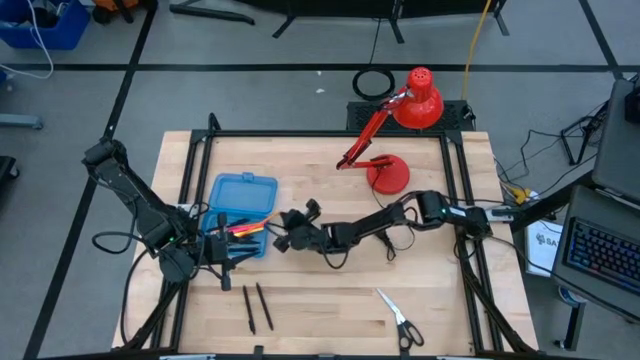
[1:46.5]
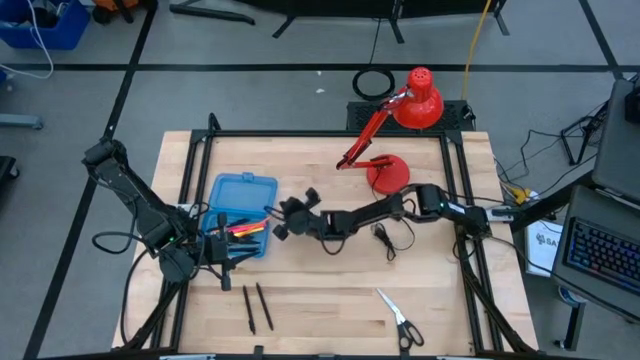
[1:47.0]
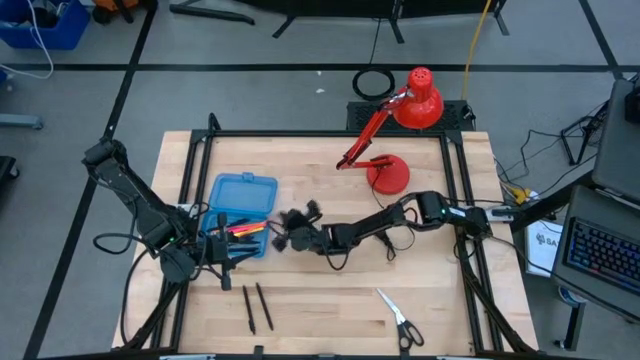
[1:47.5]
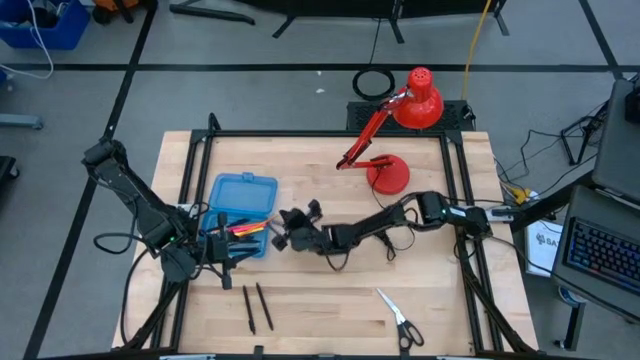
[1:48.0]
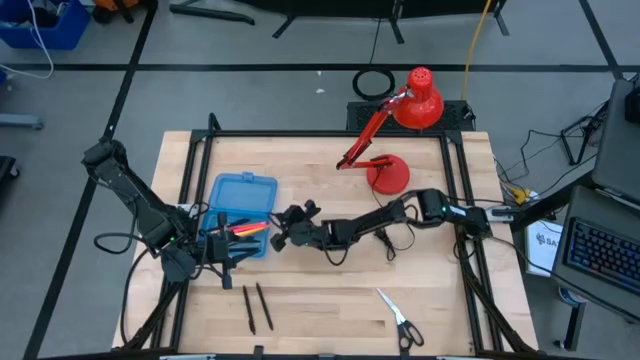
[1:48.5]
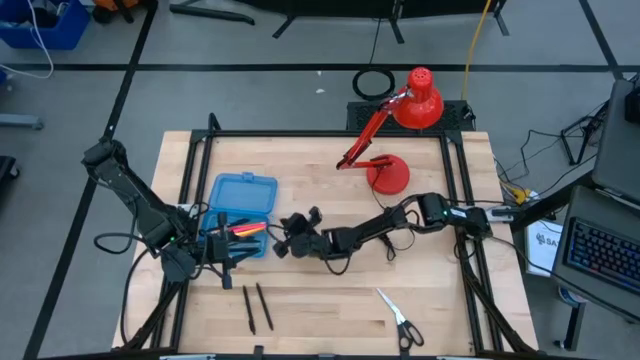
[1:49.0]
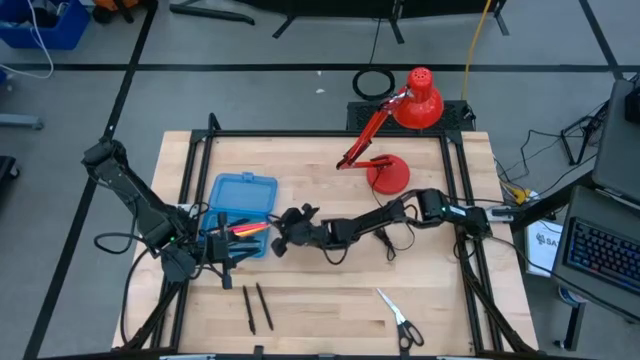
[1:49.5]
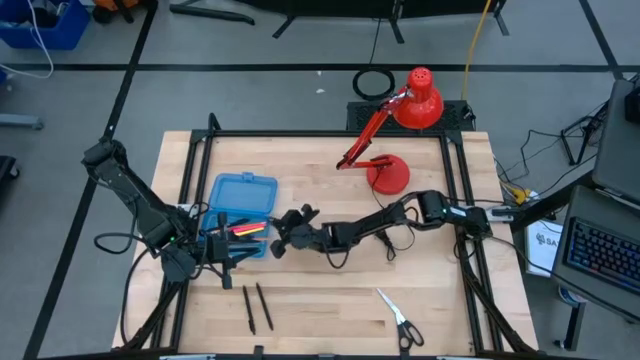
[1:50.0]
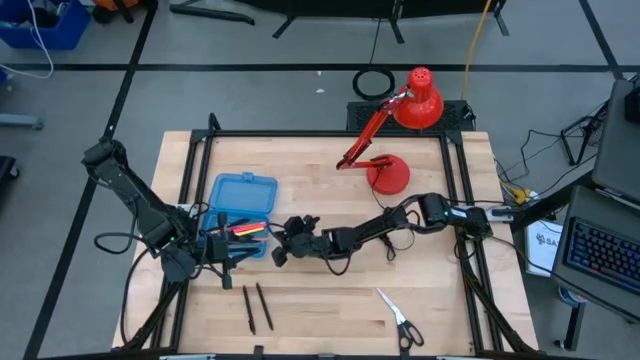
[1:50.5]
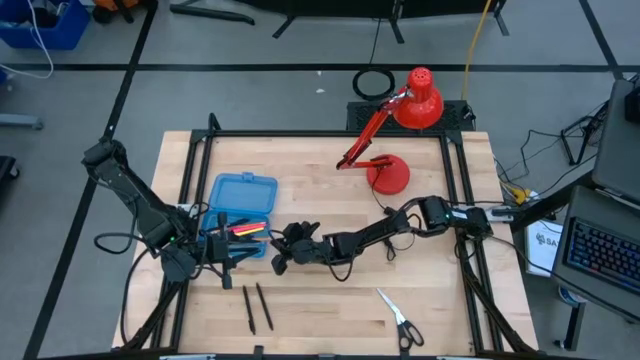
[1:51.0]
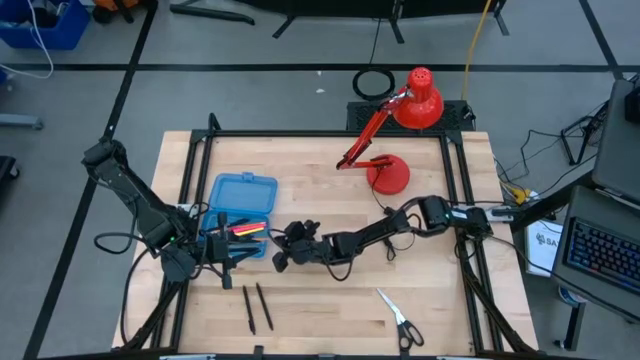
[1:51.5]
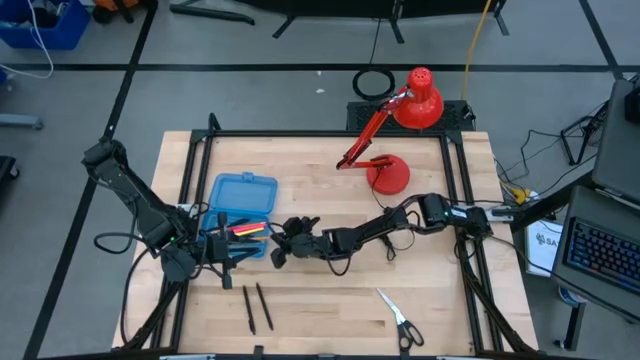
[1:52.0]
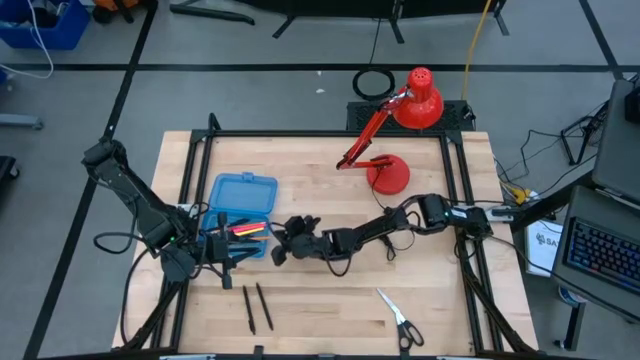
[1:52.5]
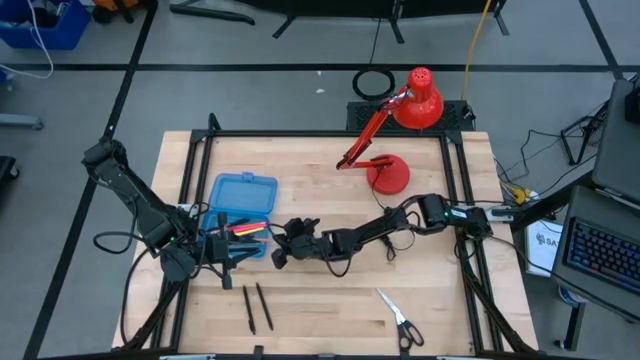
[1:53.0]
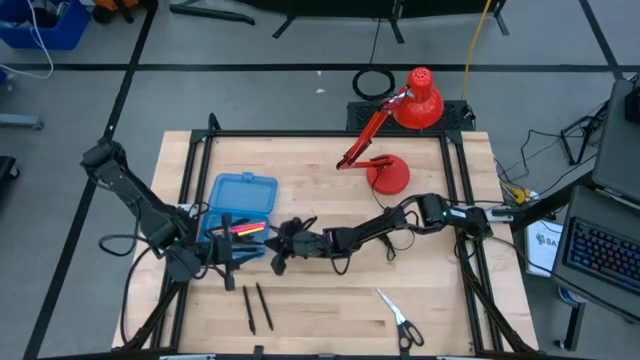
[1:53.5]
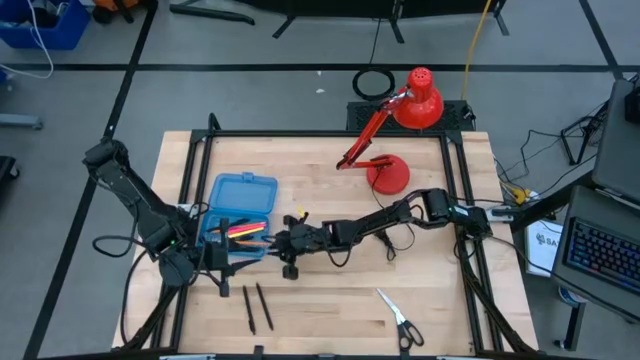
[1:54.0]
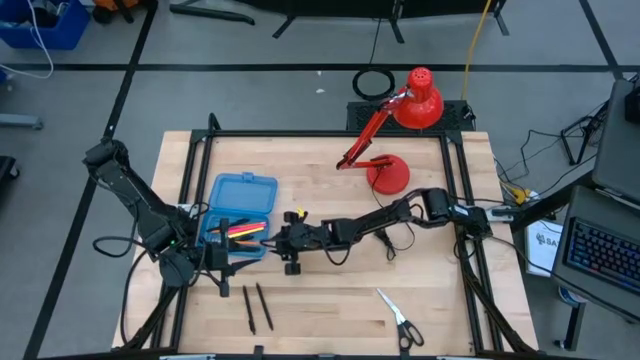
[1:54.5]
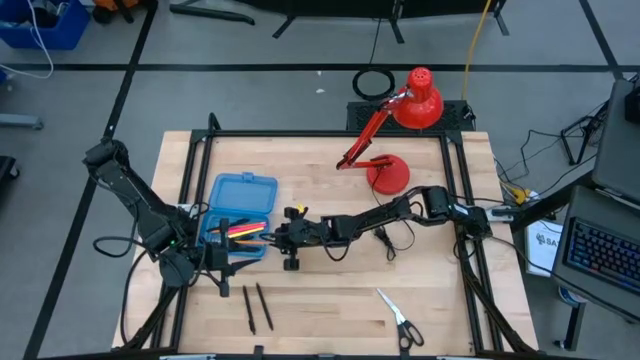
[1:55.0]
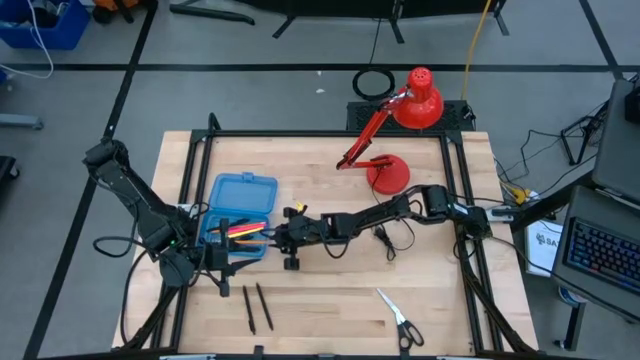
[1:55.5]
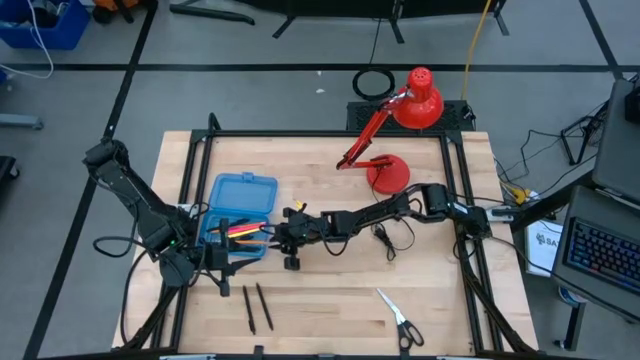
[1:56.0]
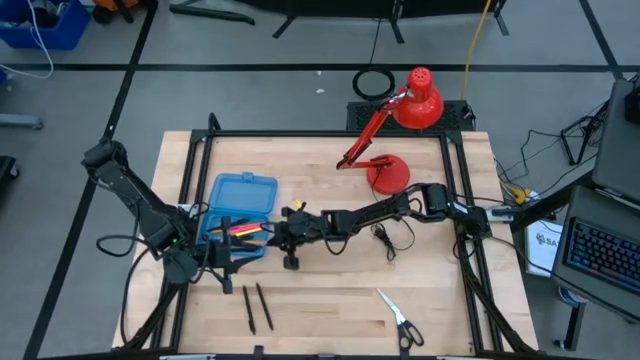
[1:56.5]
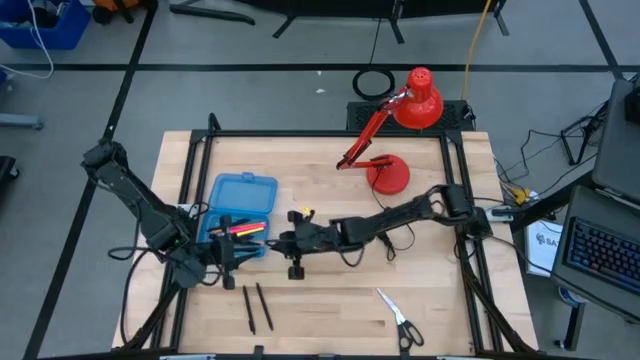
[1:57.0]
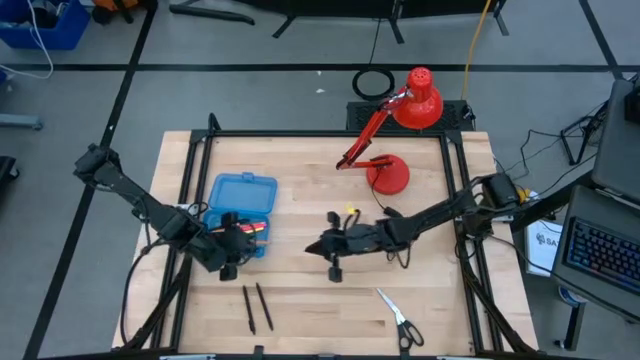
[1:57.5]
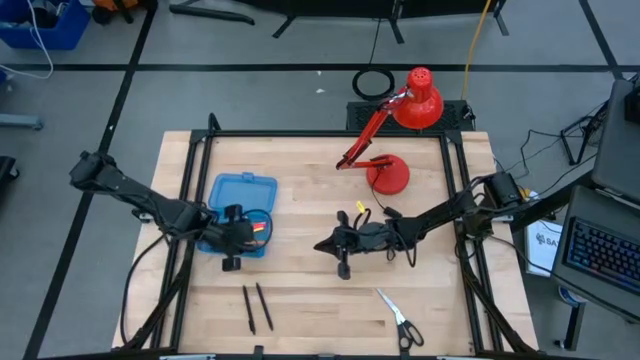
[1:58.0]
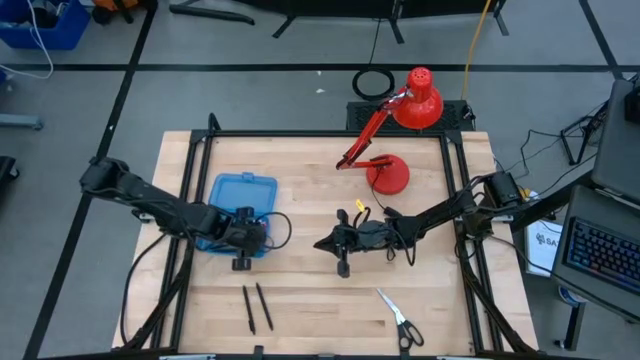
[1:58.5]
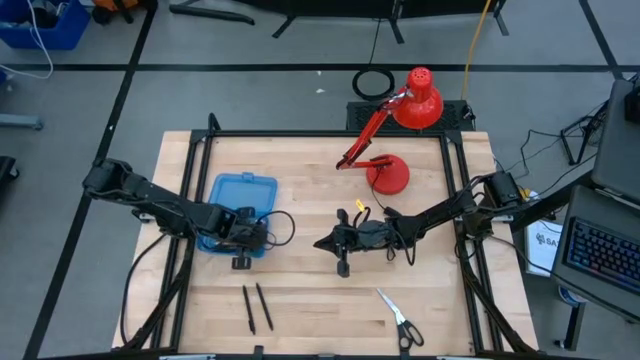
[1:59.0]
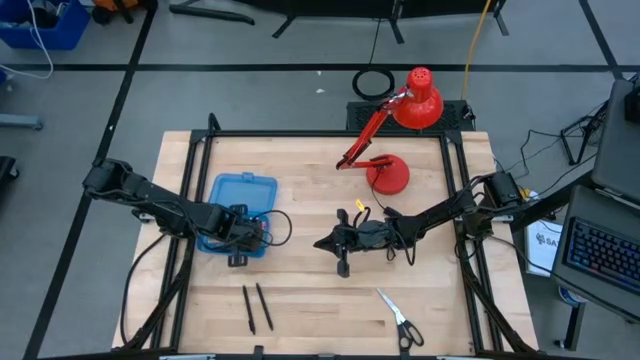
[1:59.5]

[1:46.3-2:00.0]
Task: Pick & place school supplies into a supply box
Put the yellow pencil into the blue supply box

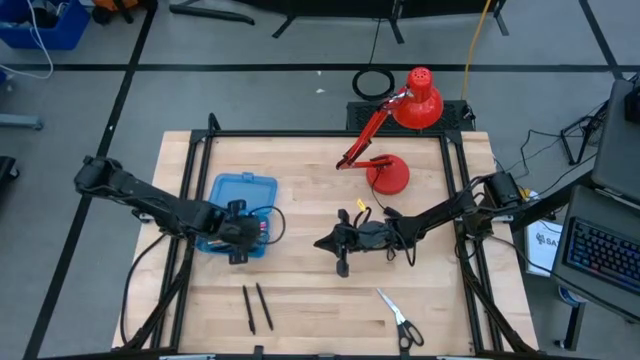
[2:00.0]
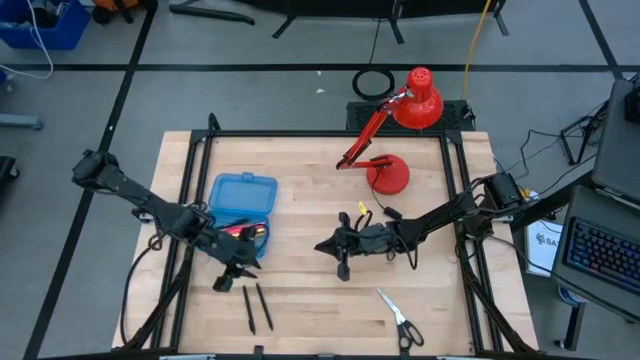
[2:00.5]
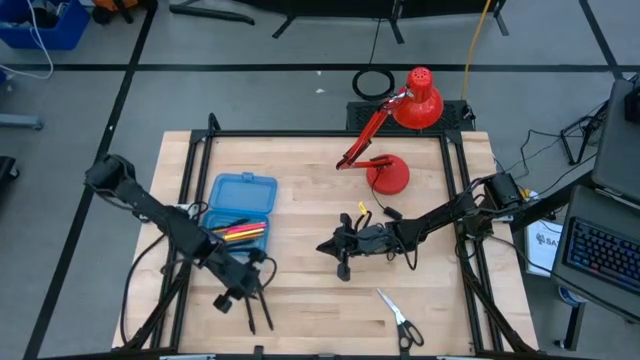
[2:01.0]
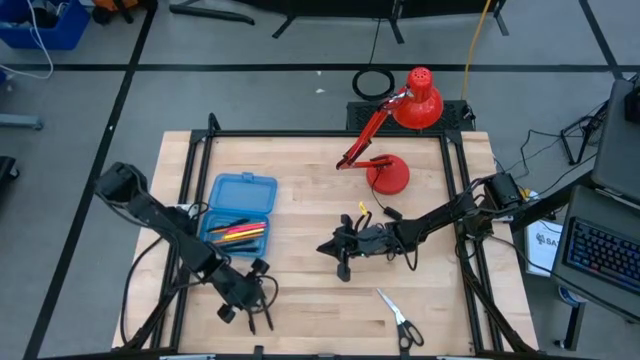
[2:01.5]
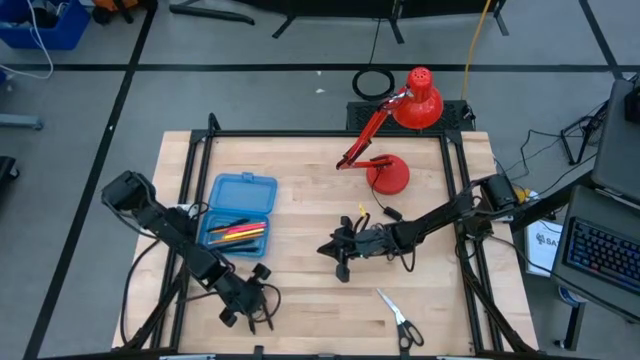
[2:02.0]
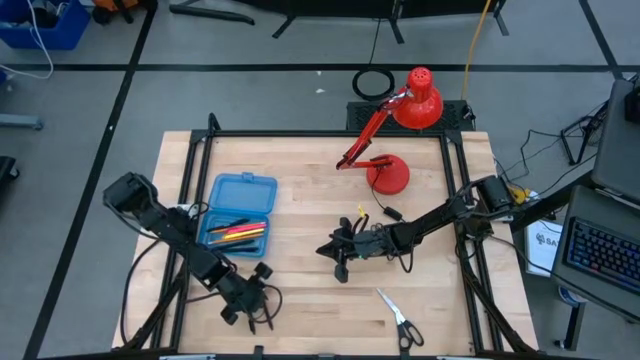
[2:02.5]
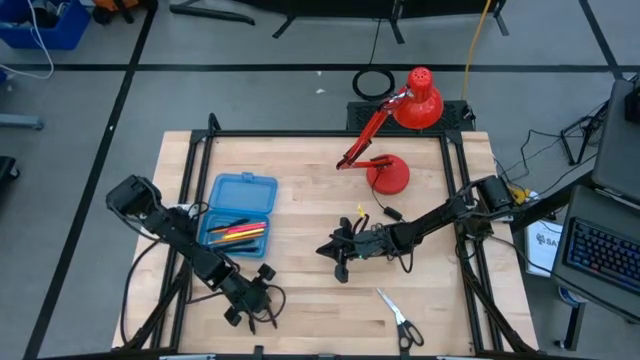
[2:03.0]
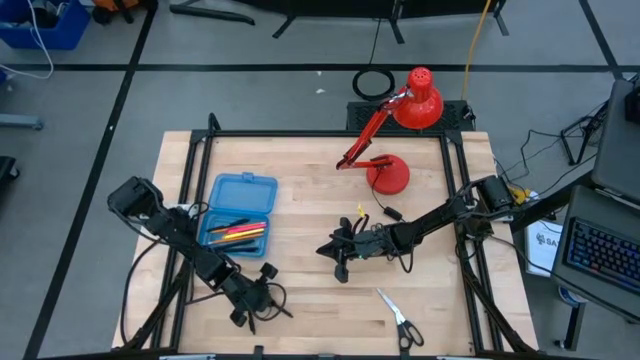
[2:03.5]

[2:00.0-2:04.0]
Put the black pen into the blue supply box

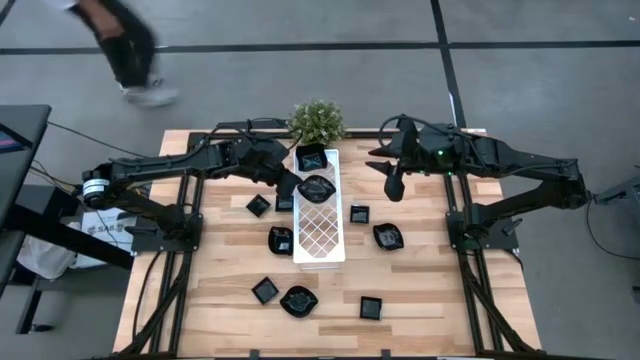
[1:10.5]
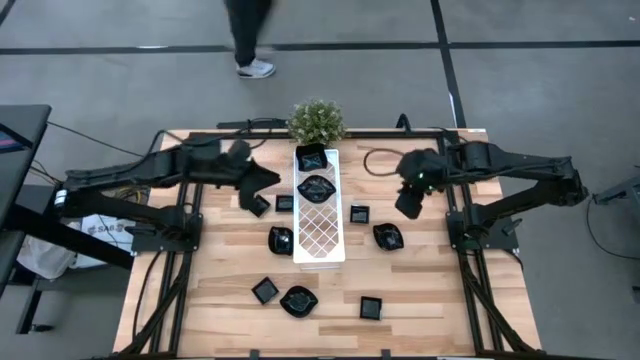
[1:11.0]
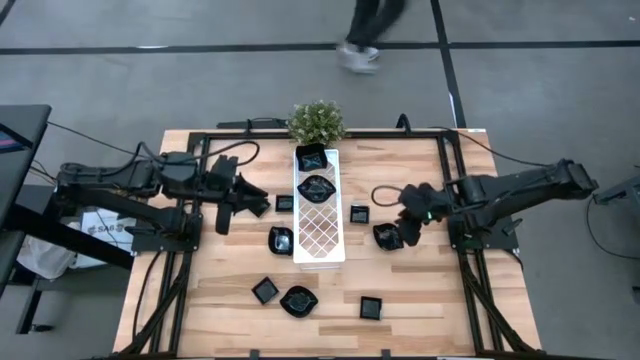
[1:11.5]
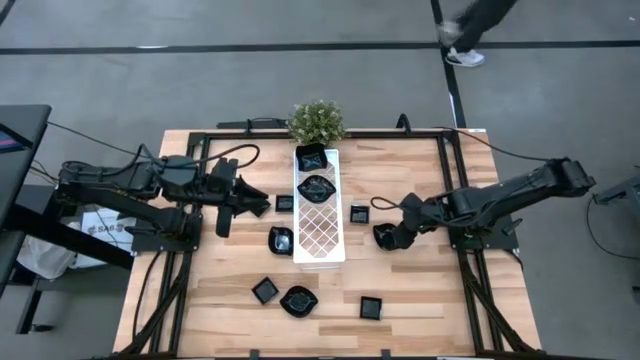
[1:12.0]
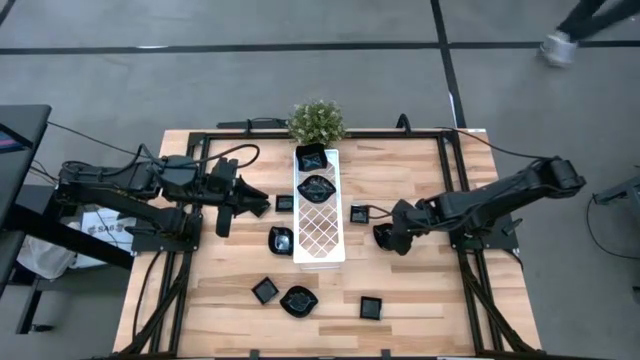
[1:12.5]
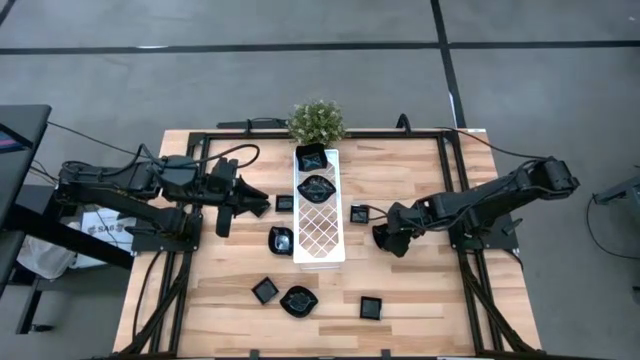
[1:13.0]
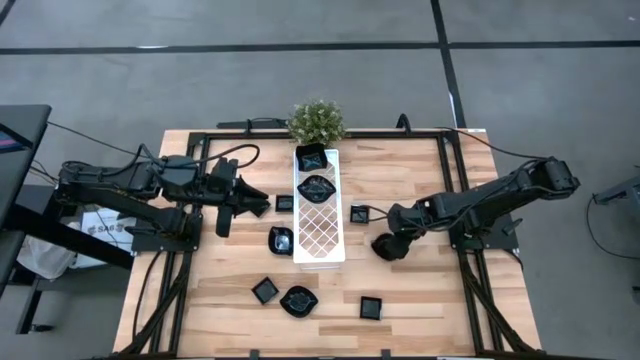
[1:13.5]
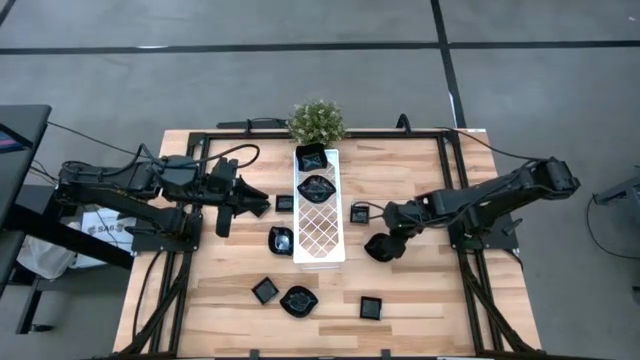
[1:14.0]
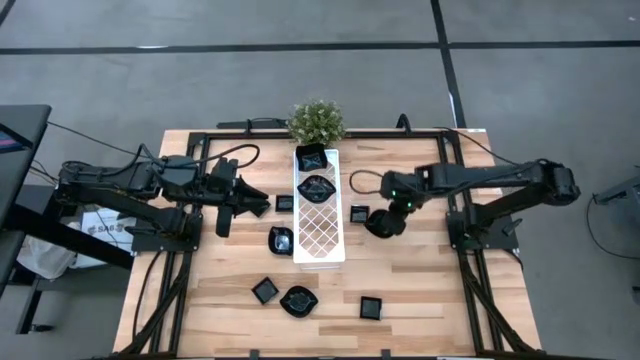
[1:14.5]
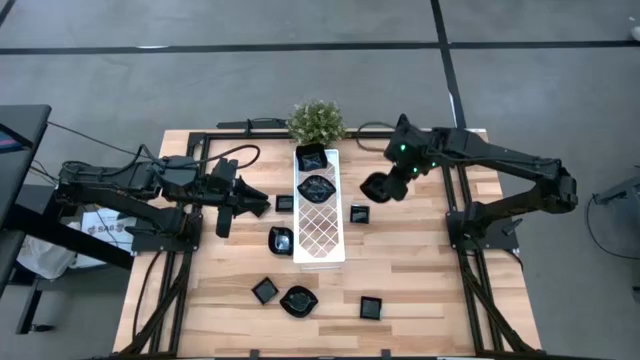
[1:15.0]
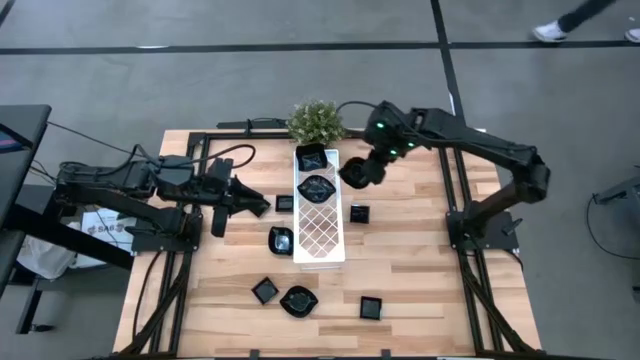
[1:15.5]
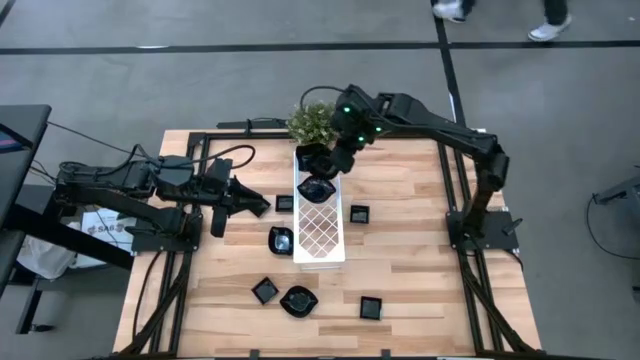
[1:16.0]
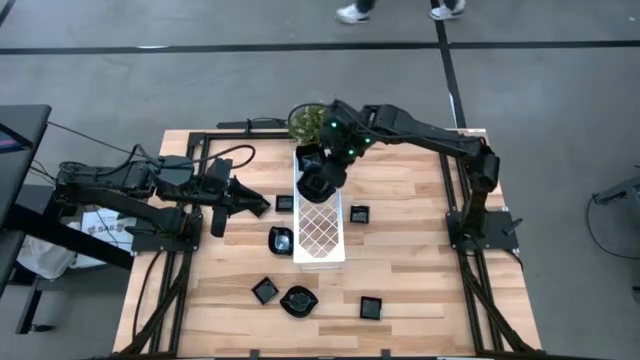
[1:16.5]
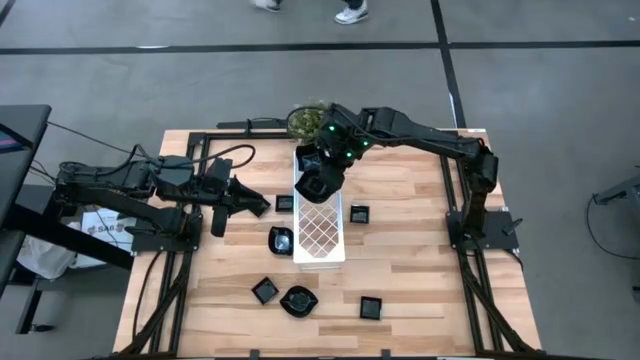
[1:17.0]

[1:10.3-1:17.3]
Task: Pick & Place Mini shaped plates
Stack the top right leaf-shaped plate on the other leaf-shaped plate on the shelf
